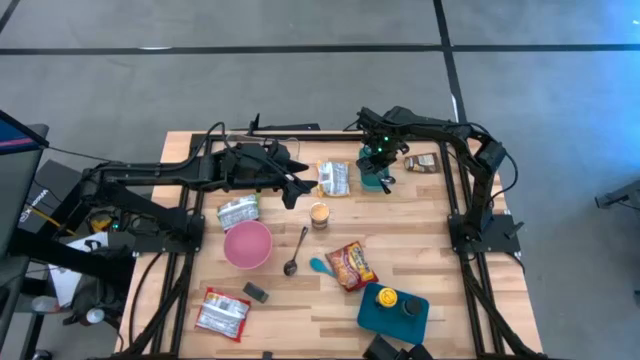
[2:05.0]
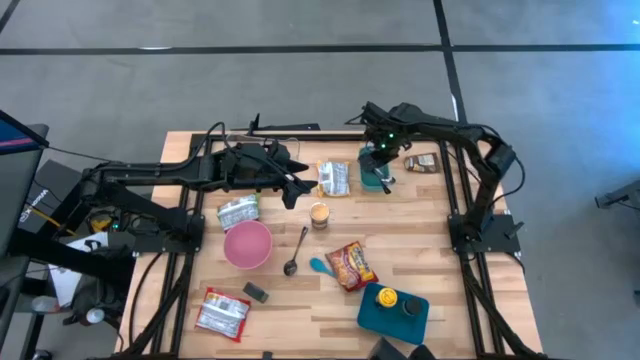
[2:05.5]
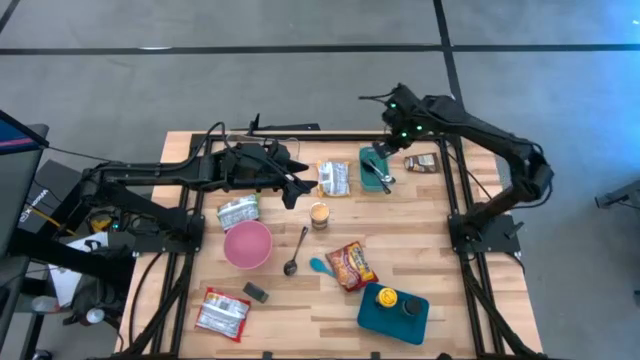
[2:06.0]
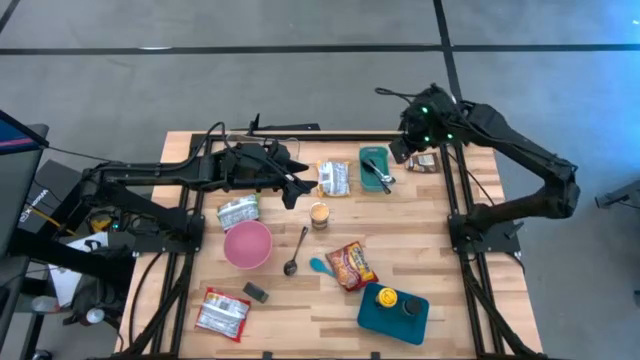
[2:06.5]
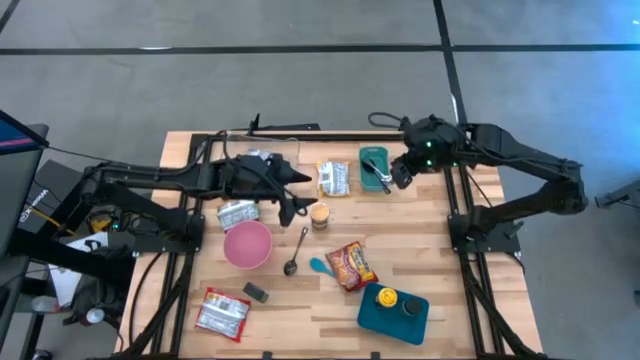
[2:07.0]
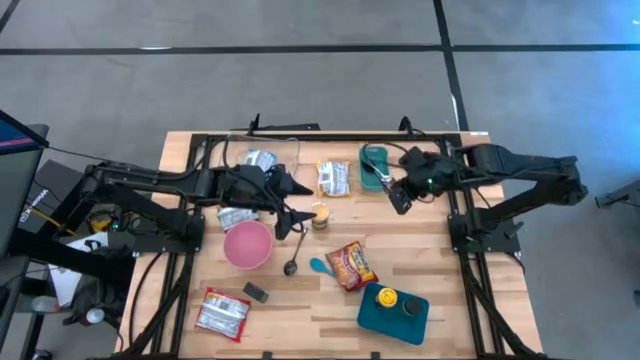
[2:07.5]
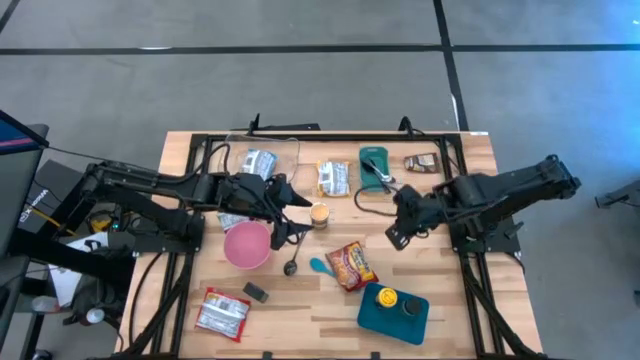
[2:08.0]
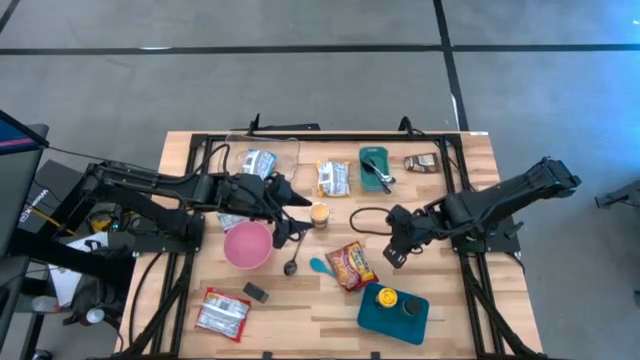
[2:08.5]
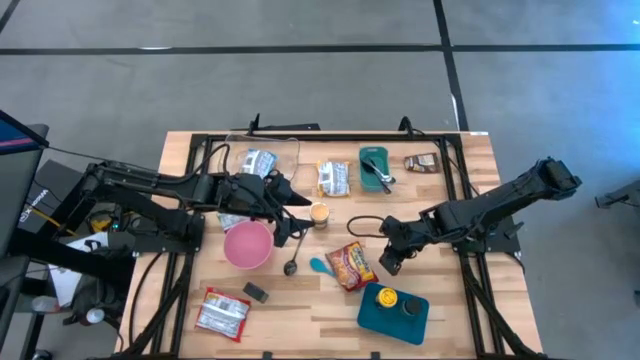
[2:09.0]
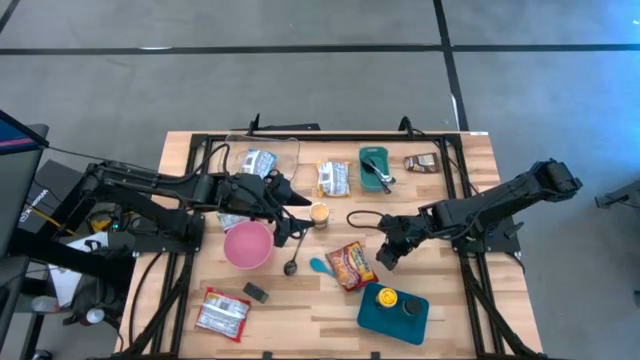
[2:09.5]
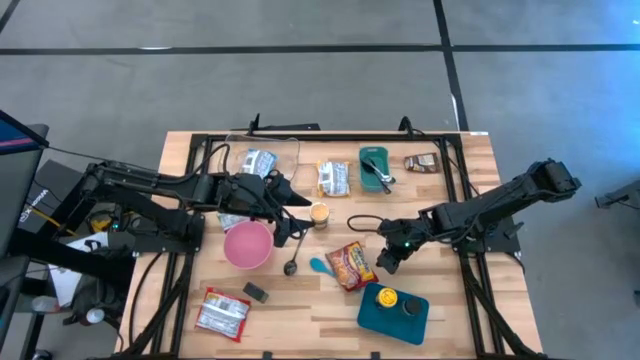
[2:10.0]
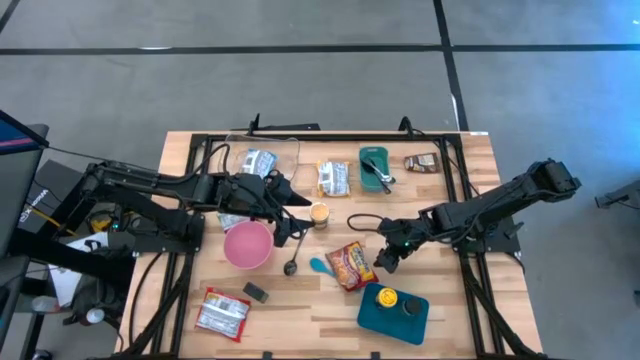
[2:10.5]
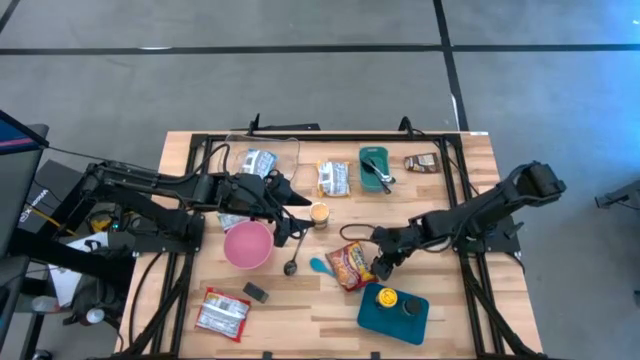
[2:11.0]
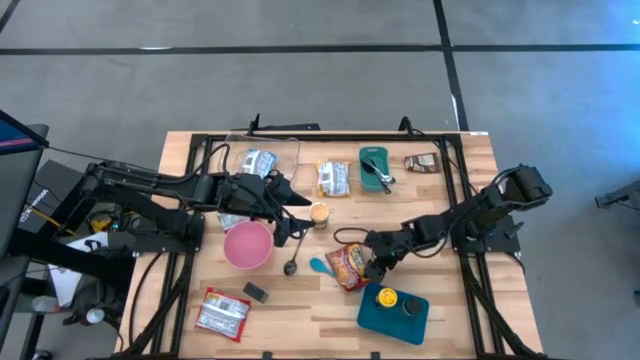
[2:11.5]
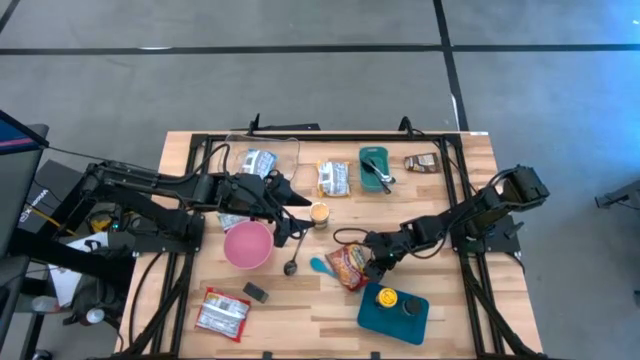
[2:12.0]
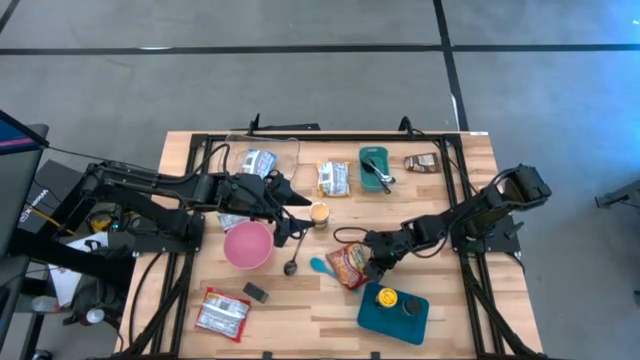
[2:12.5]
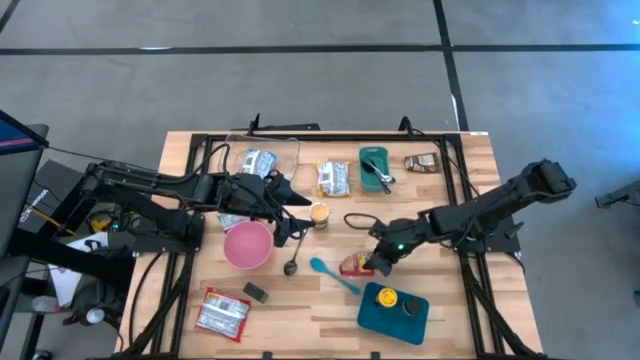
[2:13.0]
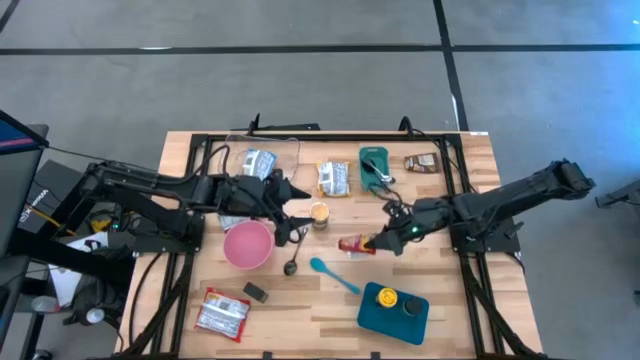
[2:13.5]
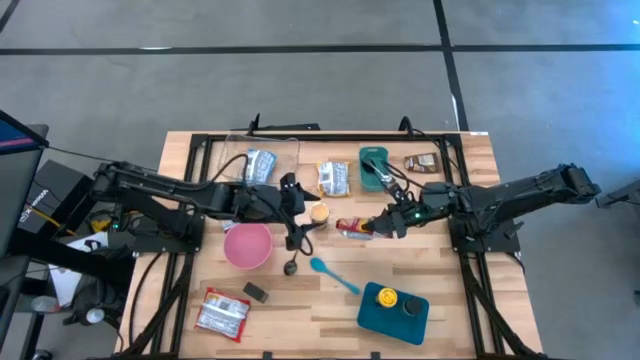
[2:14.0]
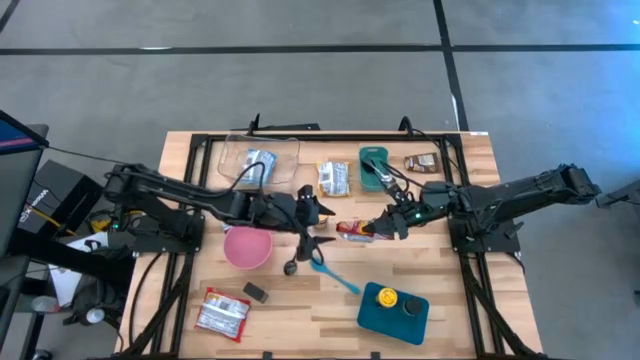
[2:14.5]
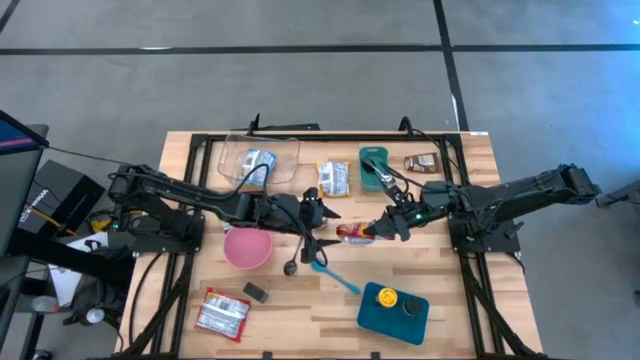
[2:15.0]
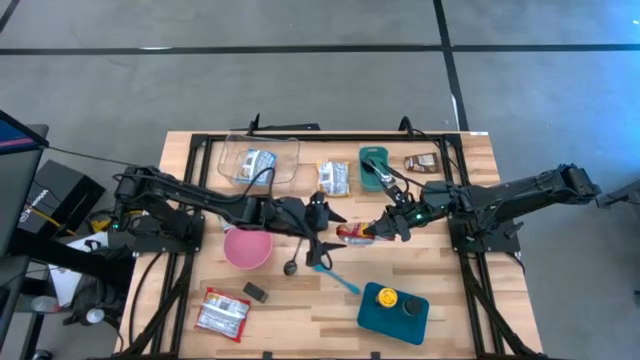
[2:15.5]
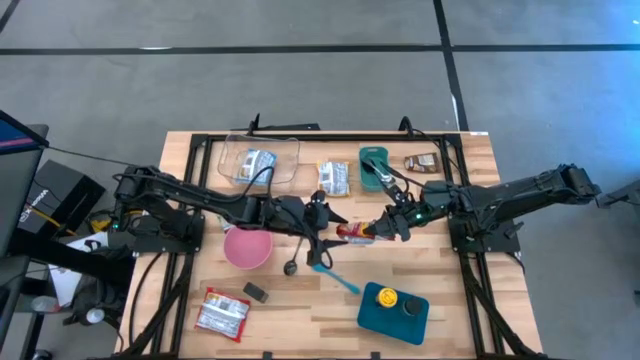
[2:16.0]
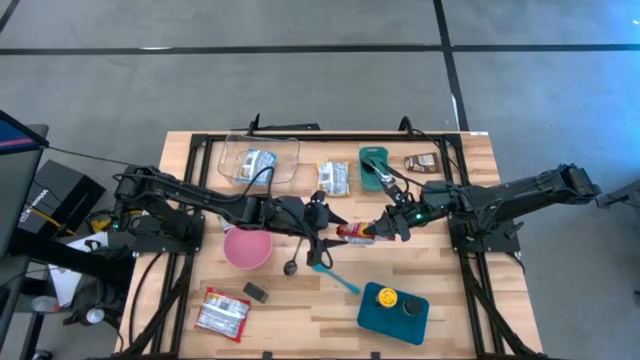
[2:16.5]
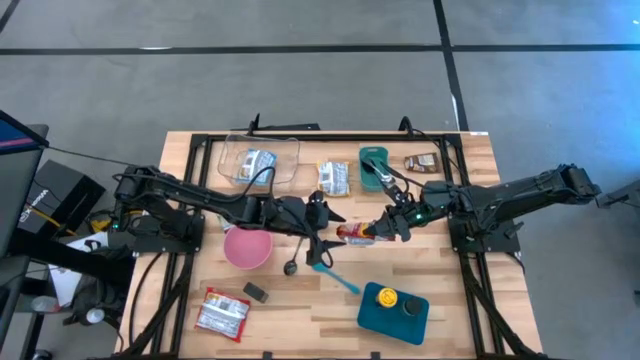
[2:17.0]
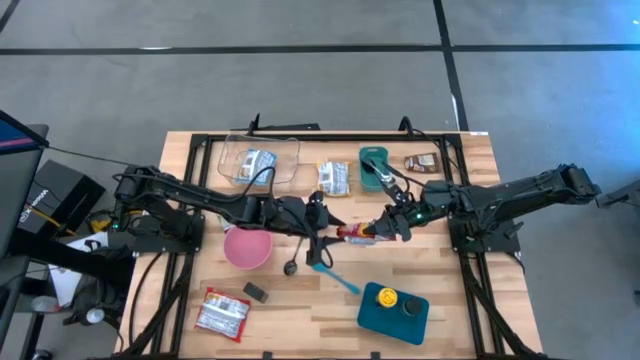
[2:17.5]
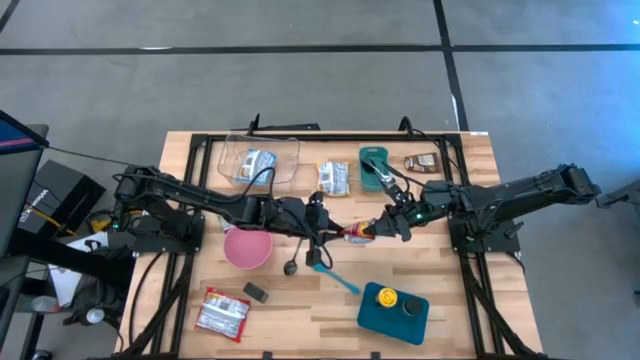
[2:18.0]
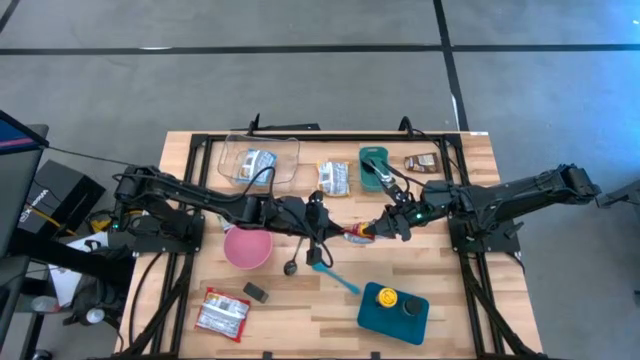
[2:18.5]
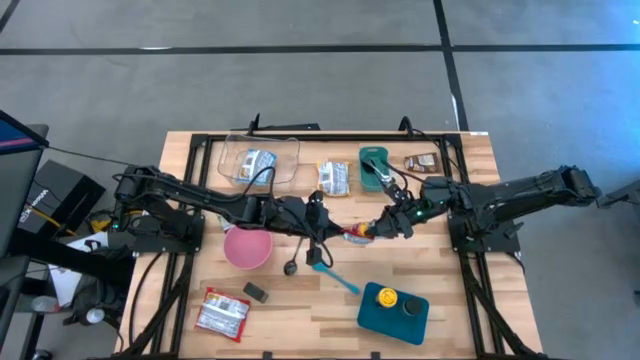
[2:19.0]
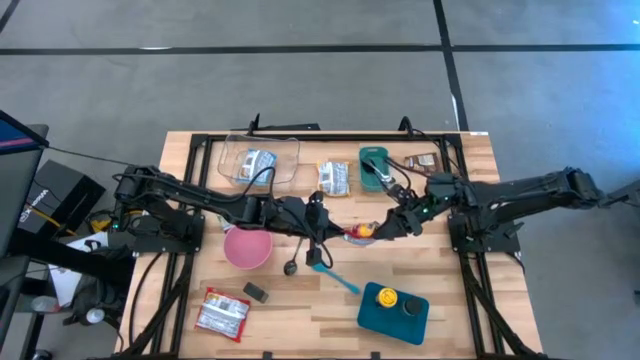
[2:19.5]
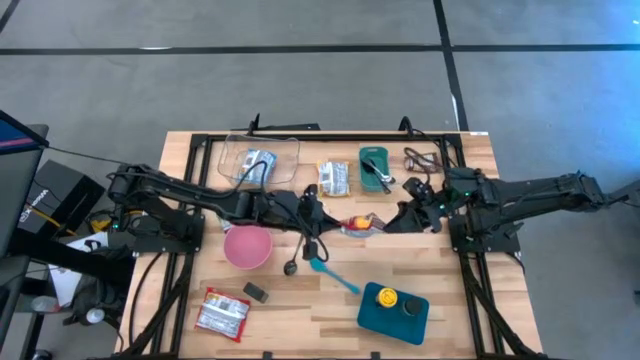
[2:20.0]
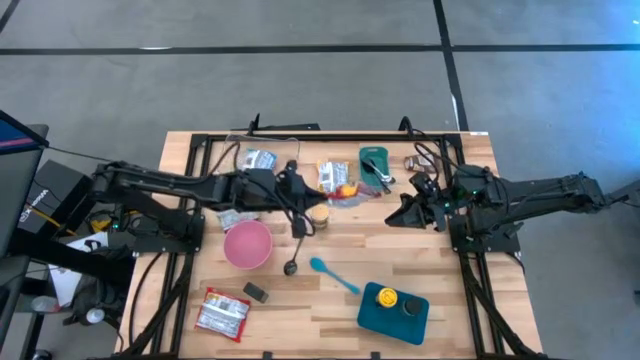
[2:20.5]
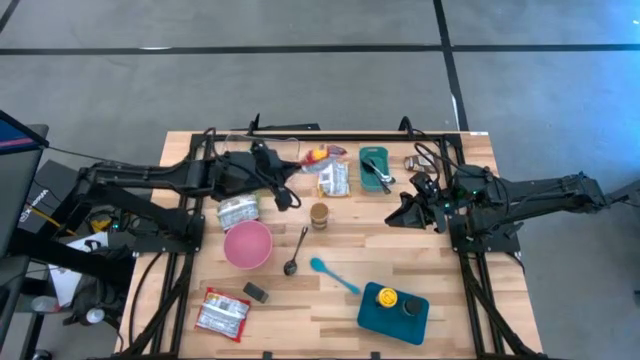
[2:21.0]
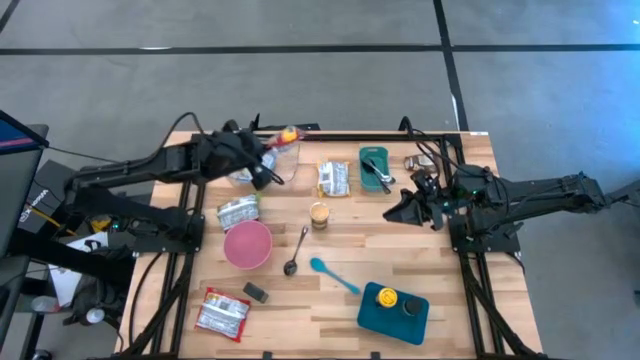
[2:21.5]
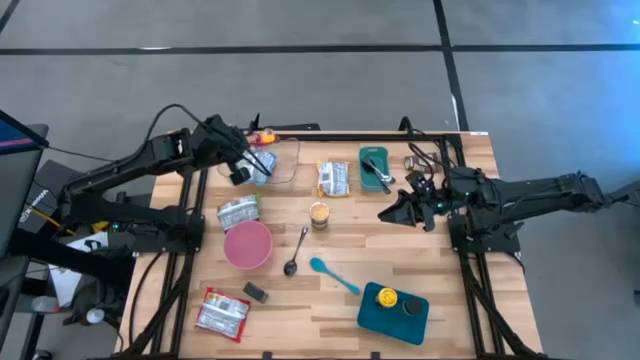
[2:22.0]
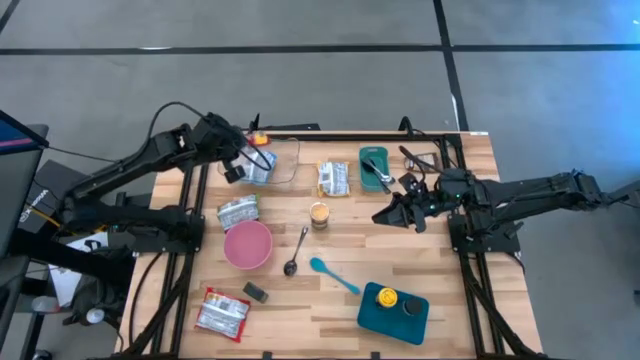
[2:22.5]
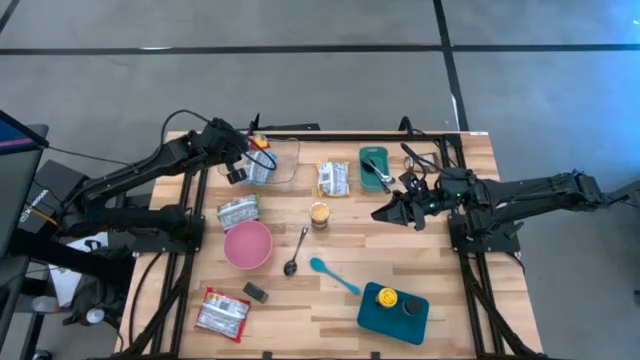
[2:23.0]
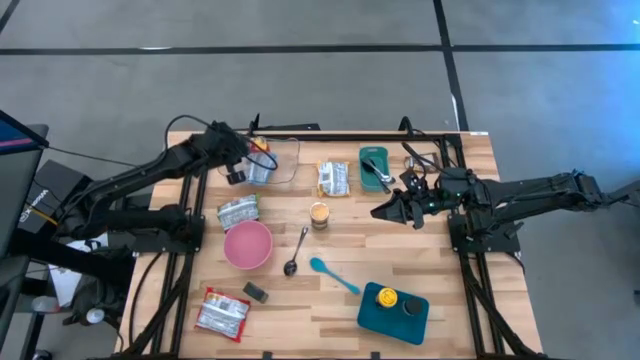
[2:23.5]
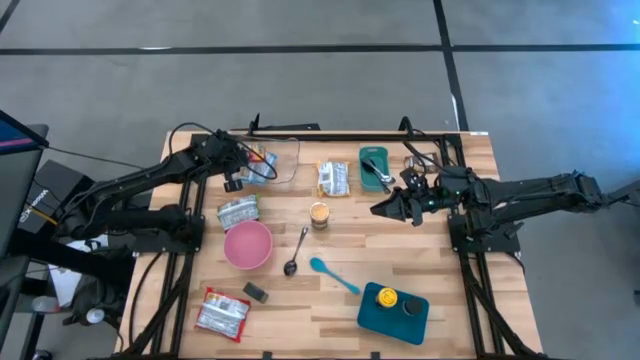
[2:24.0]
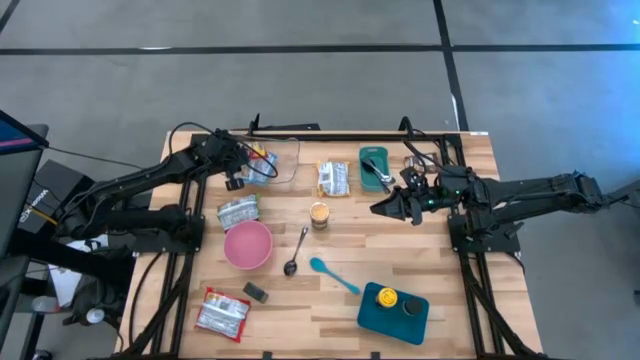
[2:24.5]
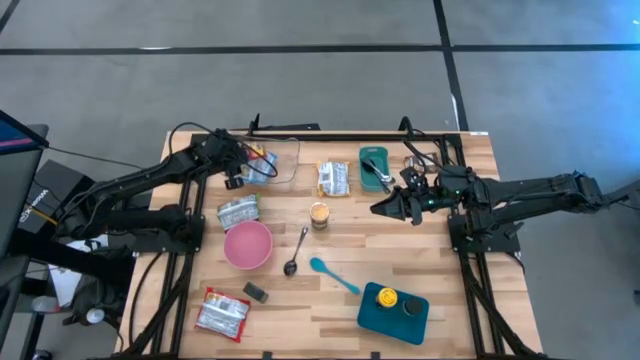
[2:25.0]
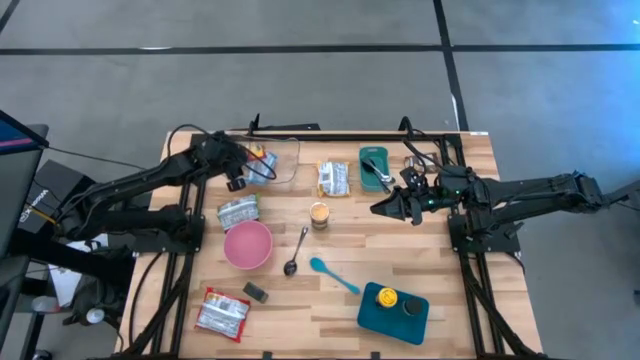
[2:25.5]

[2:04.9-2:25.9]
Task: Pick & Place Food Item
Put the red noodle pack into the transparent bin
